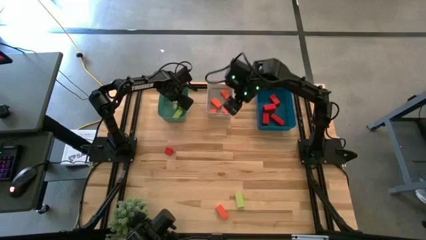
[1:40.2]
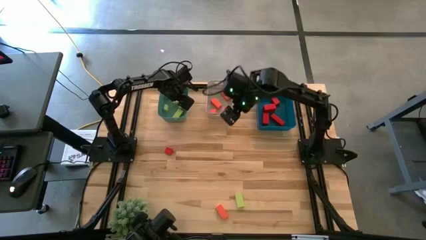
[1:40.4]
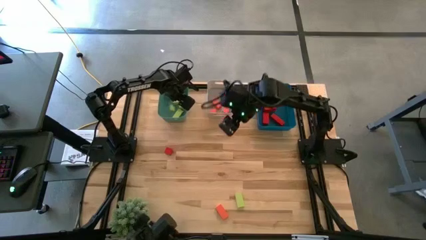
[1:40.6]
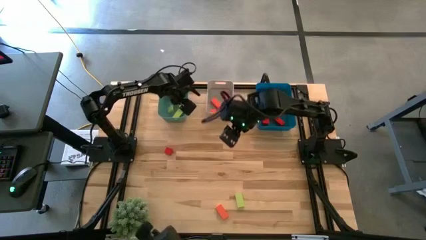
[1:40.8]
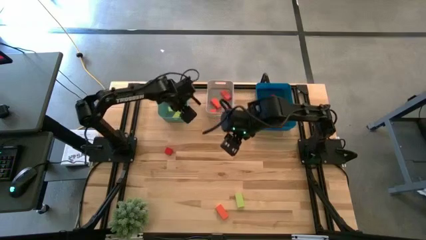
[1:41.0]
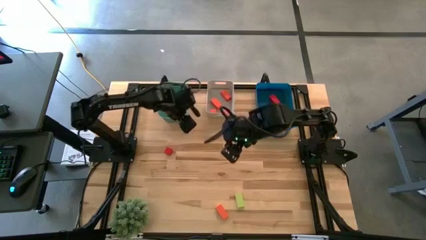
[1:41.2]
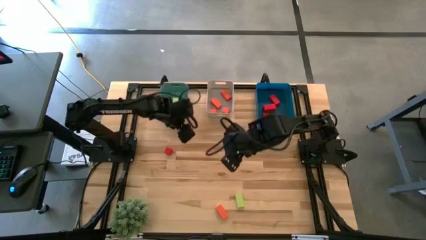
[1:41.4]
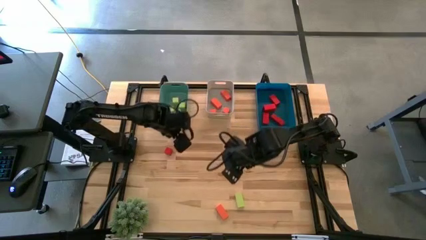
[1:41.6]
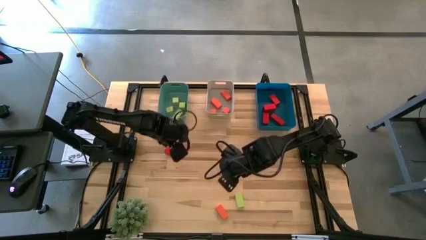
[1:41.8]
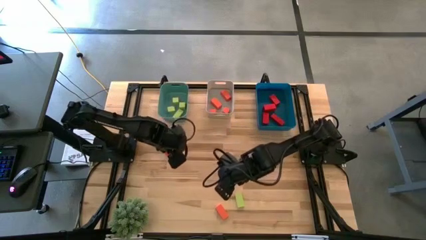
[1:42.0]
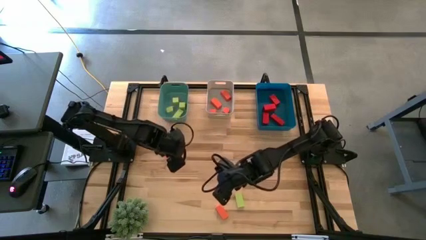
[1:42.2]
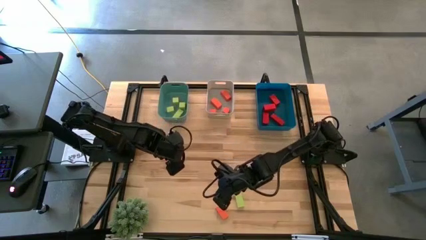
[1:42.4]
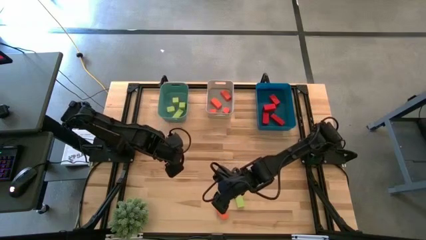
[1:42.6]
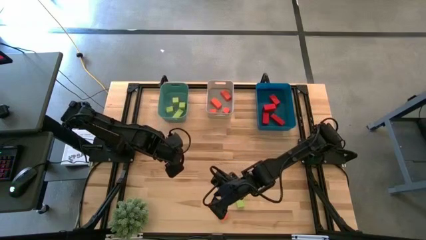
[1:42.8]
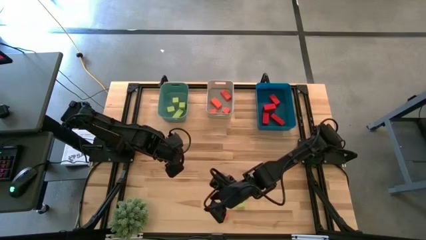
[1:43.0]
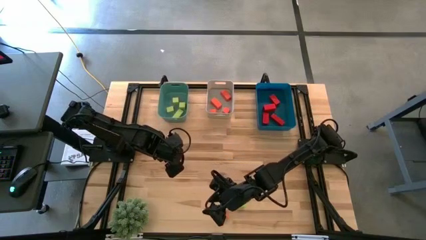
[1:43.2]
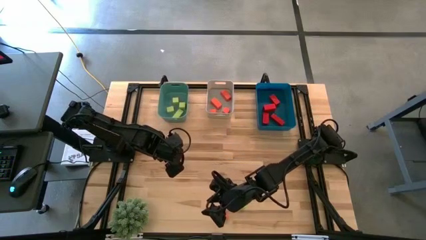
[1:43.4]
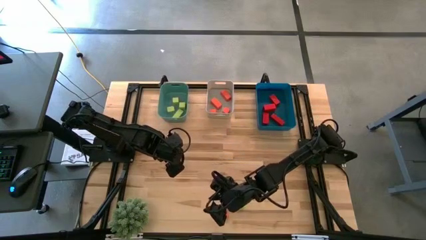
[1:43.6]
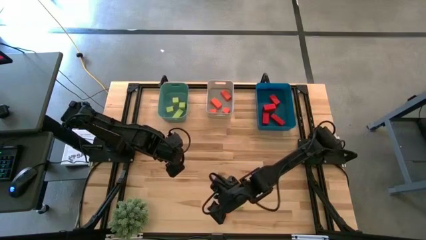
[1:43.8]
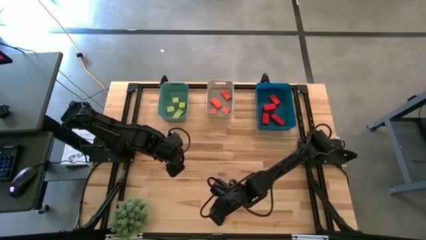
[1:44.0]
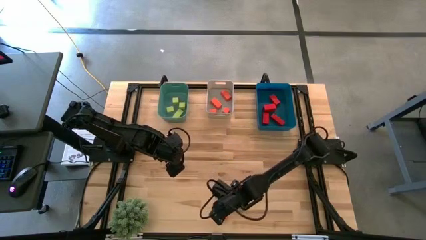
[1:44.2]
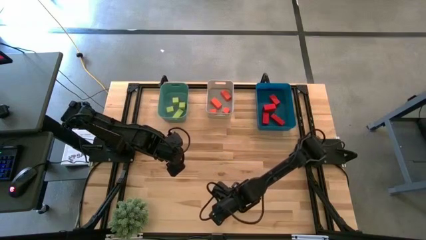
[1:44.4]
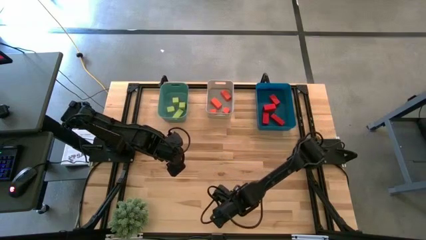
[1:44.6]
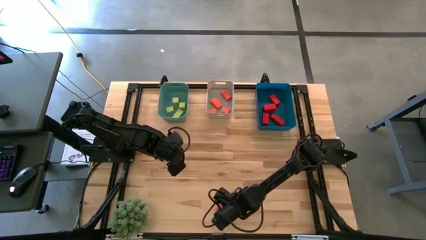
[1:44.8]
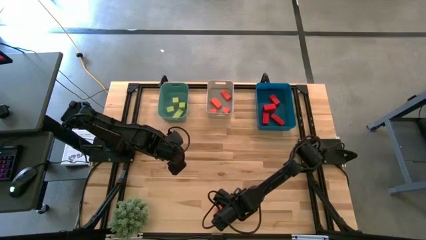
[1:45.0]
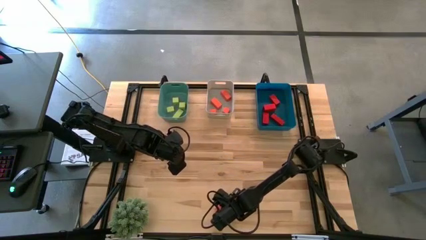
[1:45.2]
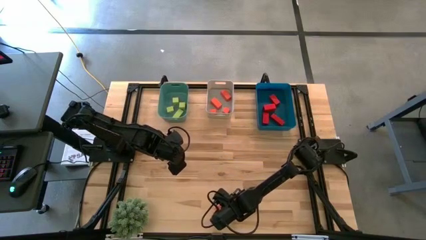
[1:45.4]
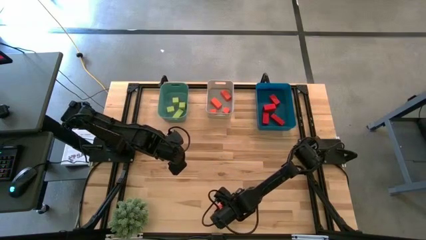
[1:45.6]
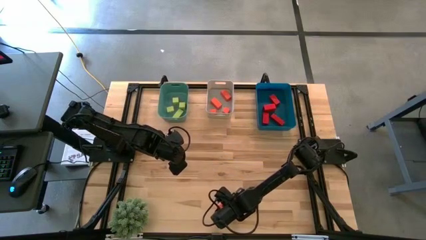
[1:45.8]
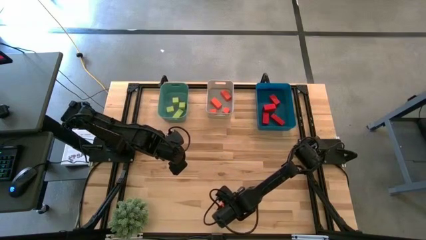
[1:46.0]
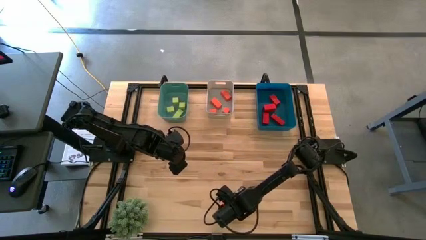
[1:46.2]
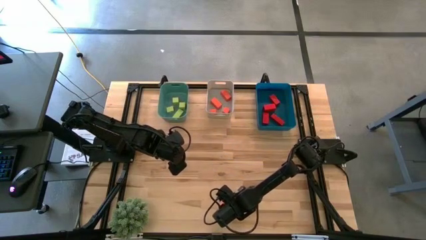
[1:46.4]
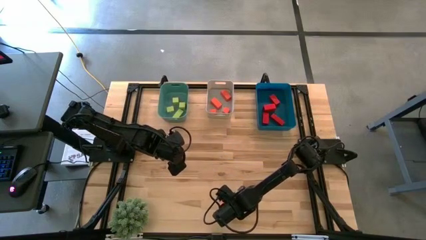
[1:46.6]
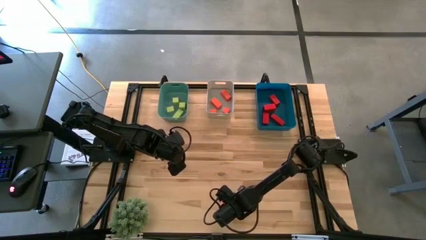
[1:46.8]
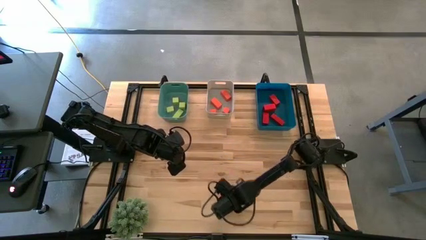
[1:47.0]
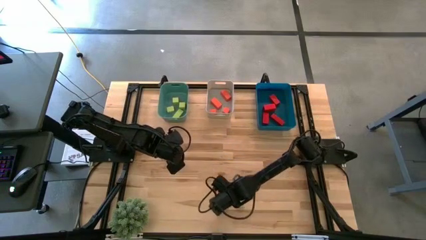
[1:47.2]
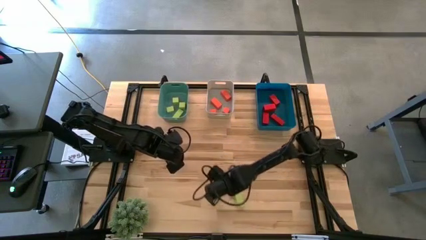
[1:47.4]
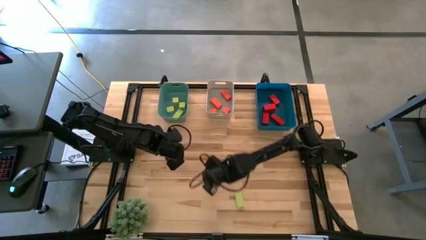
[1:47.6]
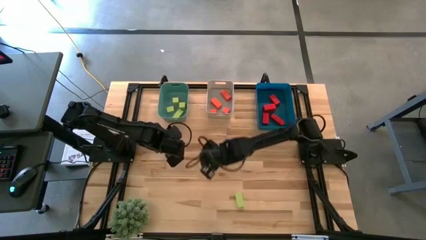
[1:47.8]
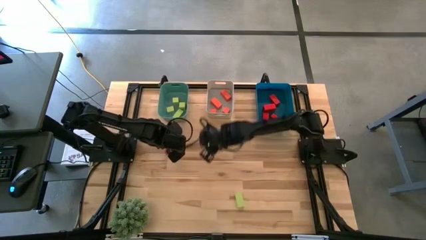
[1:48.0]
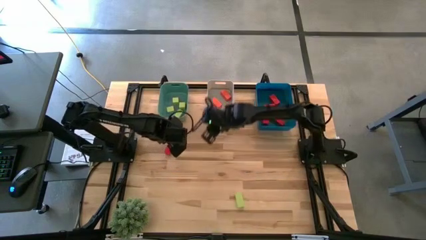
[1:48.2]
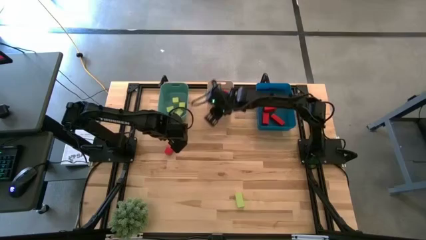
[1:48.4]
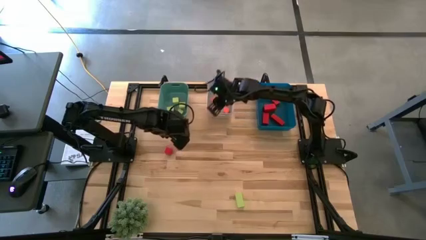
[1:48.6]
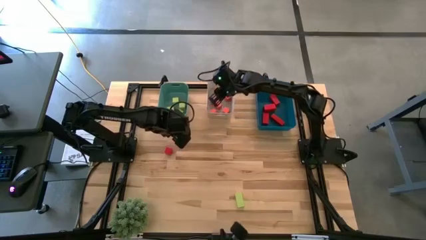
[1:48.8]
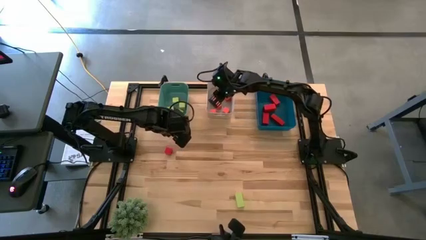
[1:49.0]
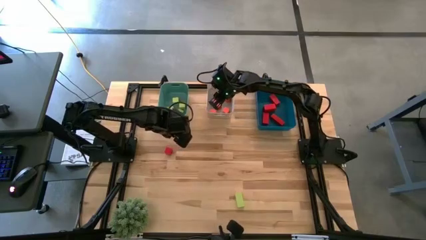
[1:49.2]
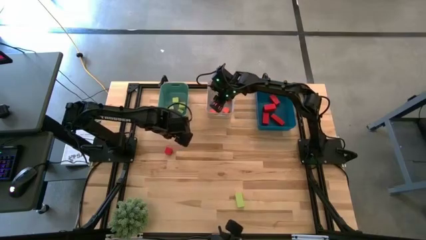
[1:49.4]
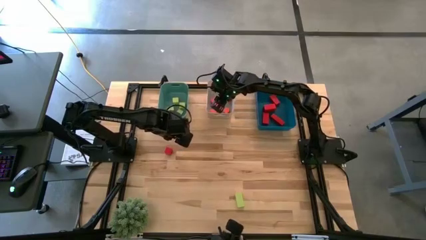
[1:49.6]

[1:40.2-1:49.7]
Task: Sort & place blocks by color
Put the orange block into the gray bin

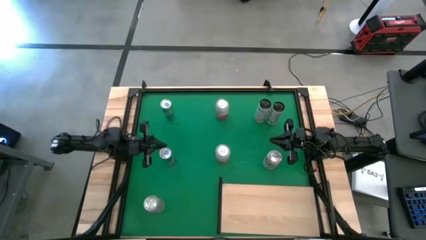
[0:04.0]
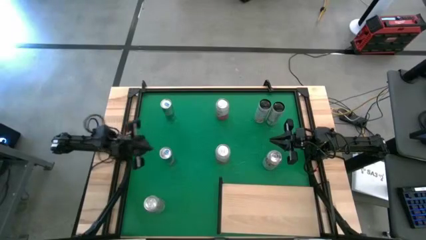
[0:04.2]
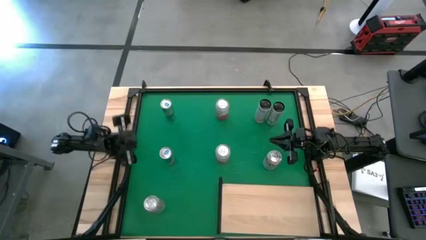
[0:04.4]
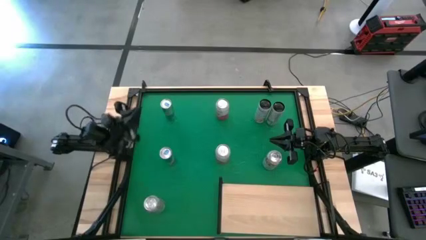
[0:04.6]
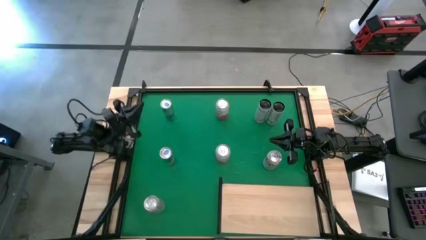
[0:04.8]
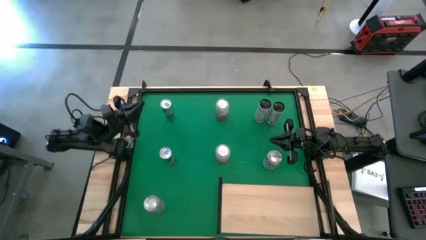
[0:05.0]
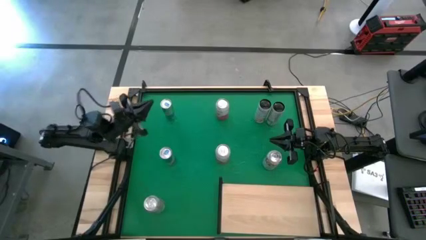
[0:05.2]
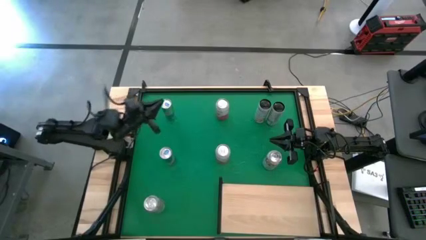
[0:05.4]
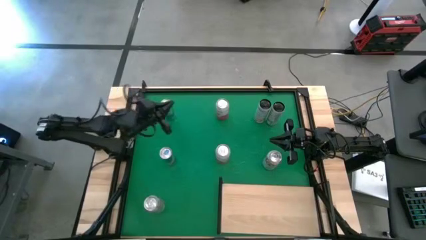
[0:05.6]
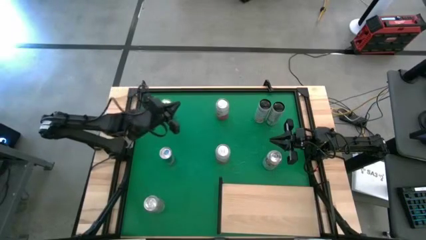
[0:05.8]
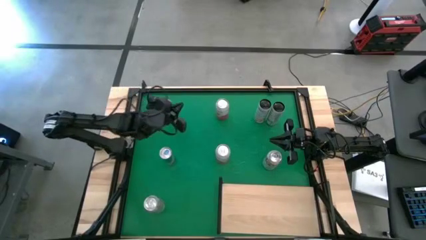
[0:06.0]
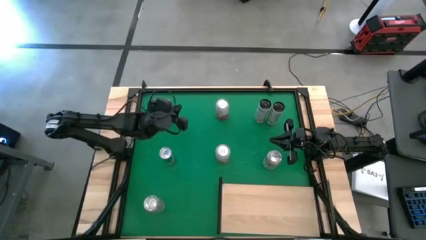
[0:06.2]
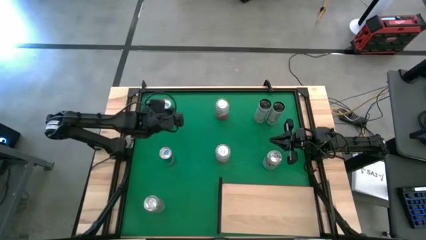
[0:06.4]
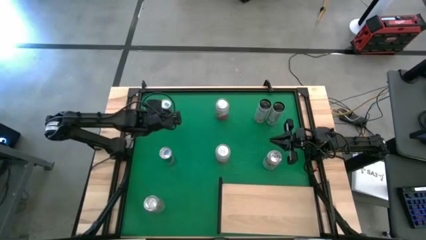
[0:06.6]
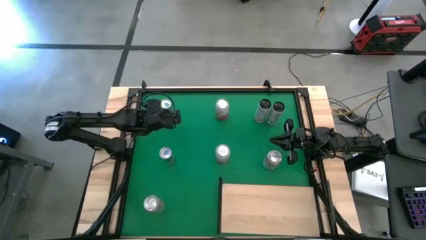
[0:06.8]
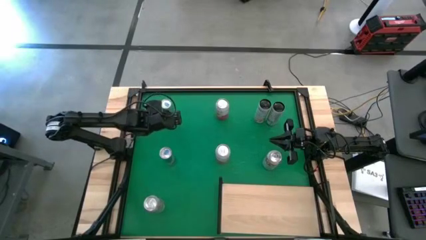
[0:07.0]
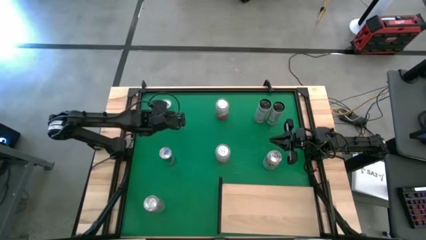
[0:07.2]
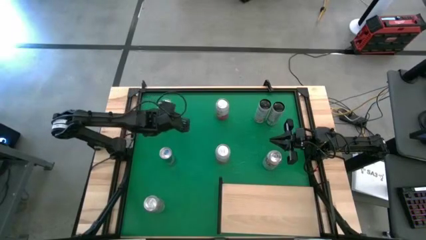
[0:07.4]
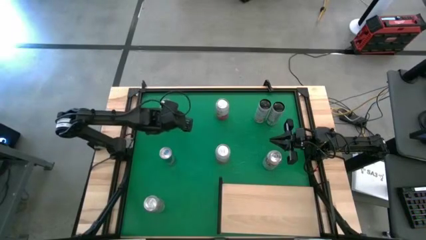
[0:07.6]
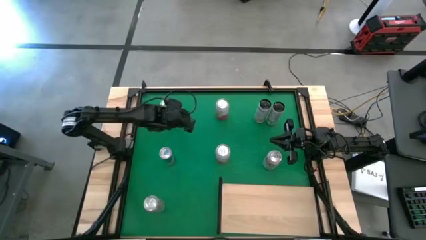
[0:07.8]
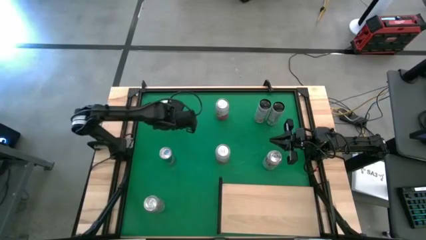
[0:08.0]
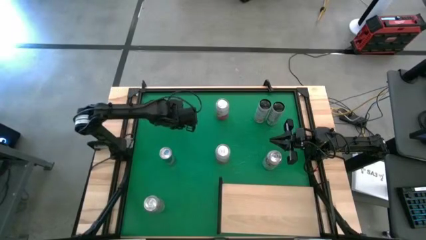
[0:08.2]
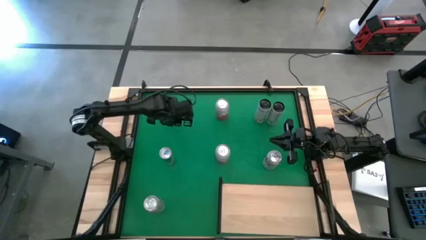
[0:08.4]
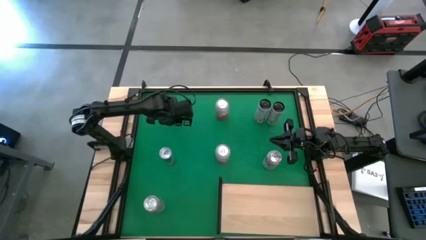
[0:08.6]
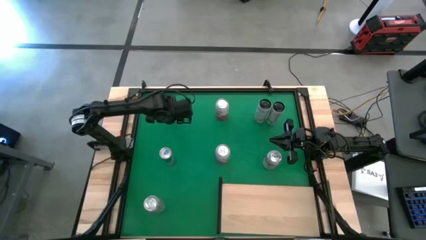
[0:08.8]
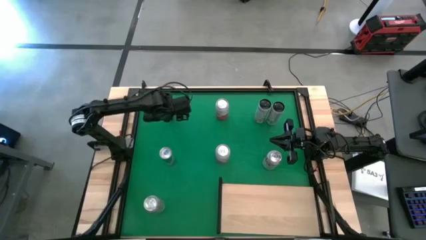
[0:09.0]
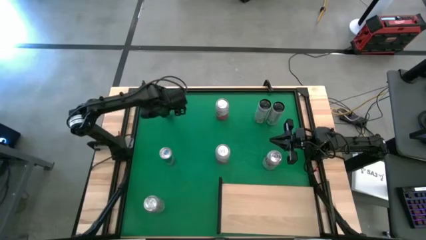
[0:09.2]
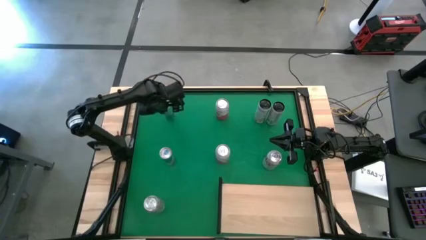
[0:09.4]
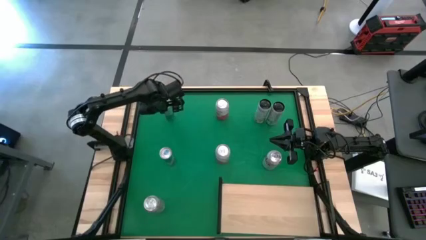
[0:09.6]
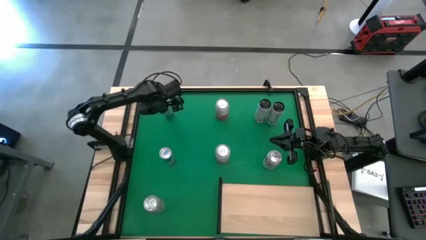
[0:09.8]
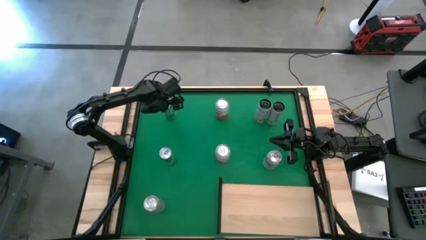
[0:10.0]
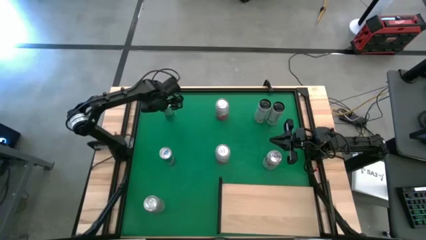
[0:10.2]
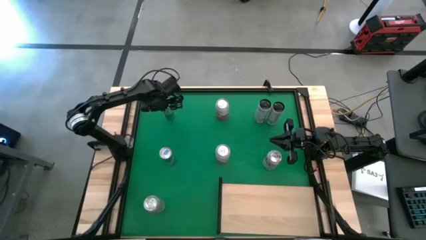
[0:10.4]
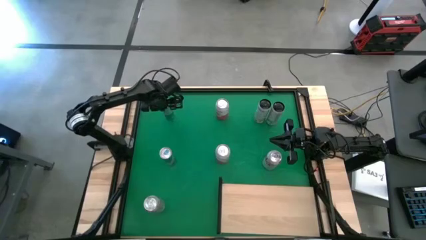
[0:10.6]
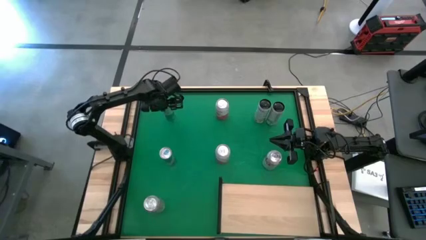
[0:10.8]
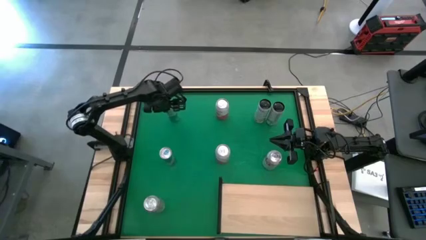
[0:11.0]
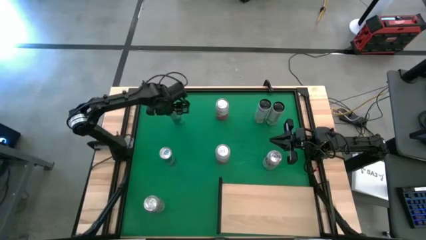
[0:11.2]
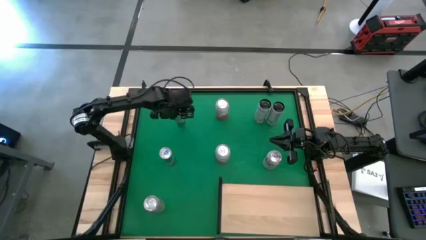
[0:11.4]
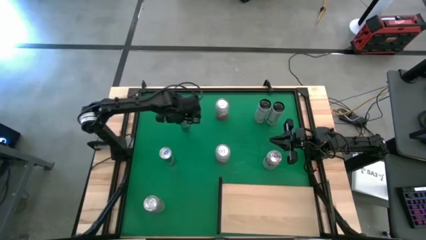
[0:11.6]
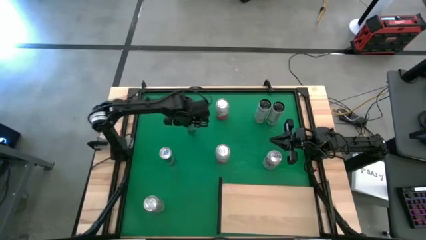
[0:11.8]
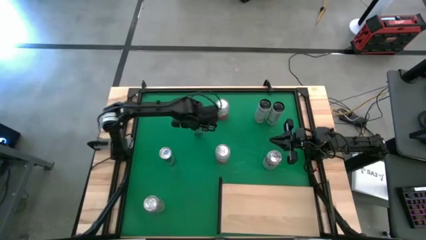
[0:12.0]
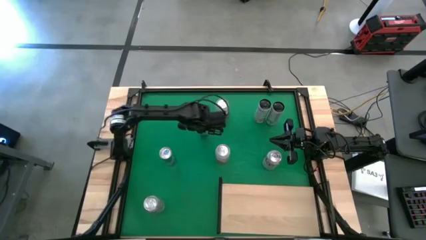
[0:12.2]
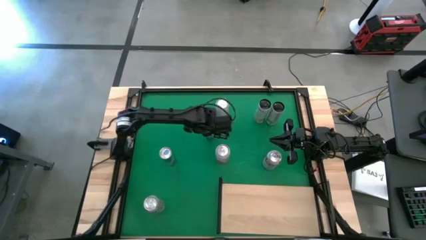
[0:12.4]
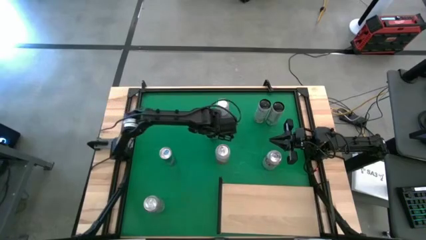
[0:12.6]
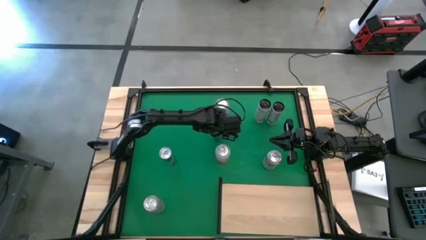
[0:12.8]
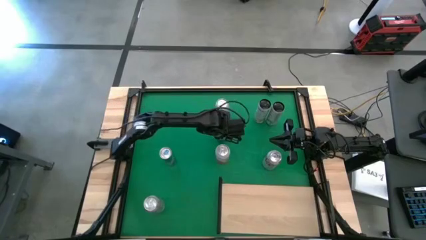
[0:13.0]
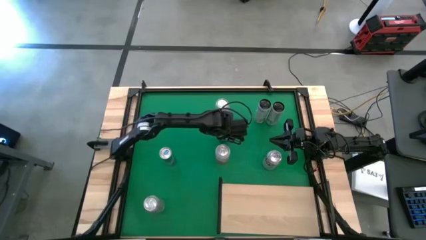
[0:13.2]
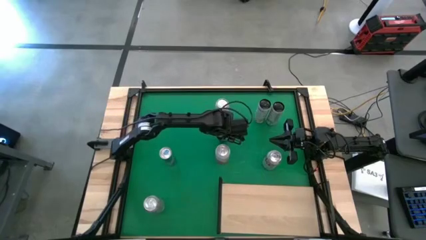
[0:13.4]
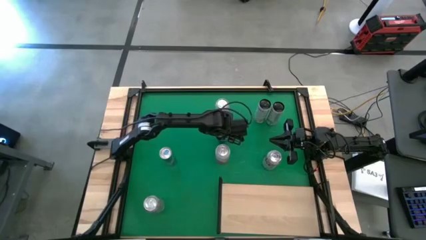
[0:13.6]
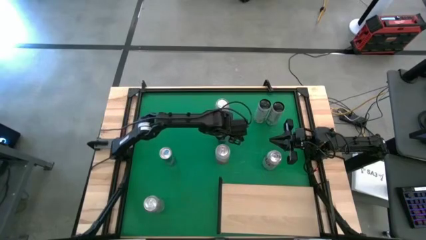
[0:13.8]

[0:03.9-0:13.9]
Task: Place canned beverage on shelf
Move the left top blue soda can to the center of the table
